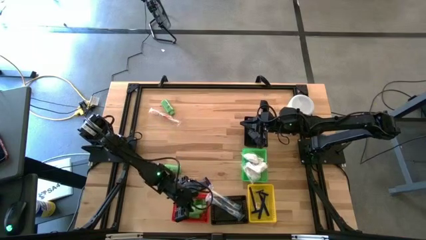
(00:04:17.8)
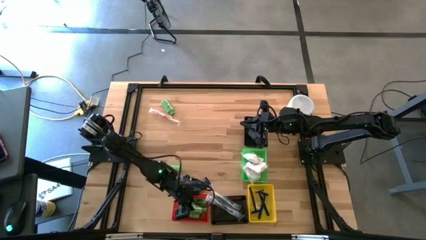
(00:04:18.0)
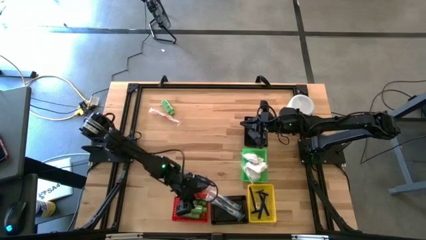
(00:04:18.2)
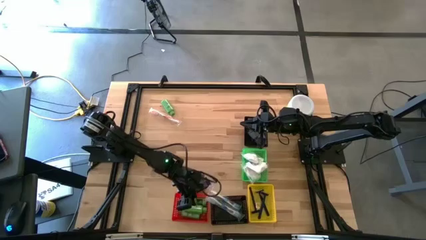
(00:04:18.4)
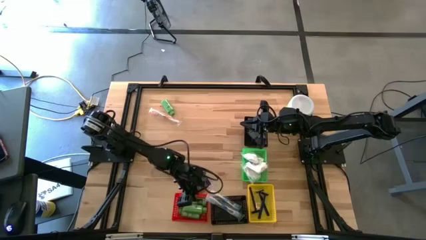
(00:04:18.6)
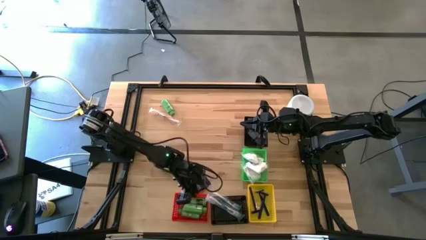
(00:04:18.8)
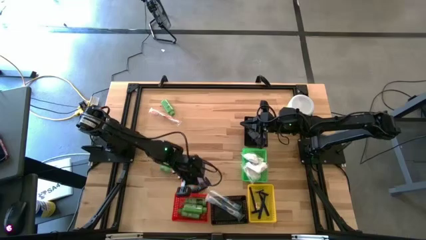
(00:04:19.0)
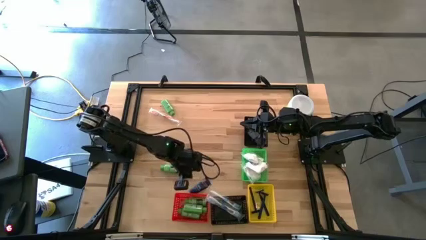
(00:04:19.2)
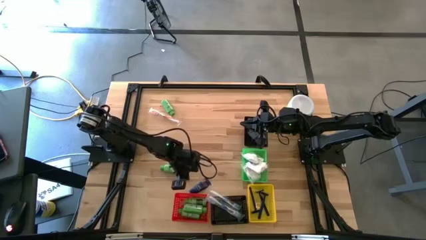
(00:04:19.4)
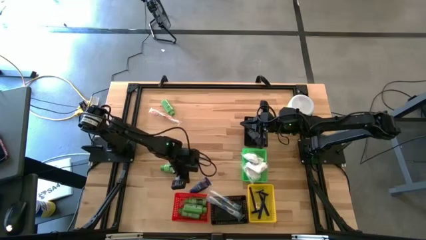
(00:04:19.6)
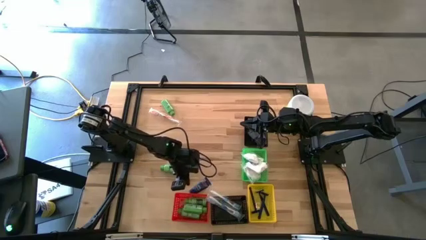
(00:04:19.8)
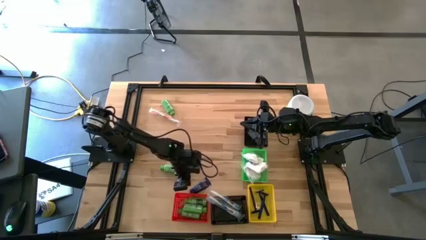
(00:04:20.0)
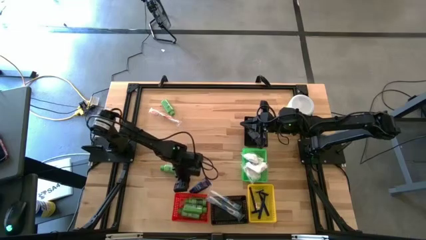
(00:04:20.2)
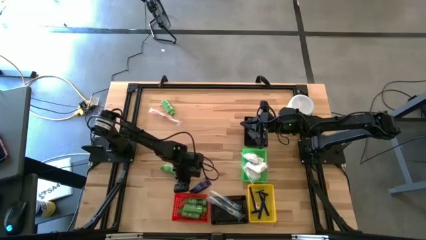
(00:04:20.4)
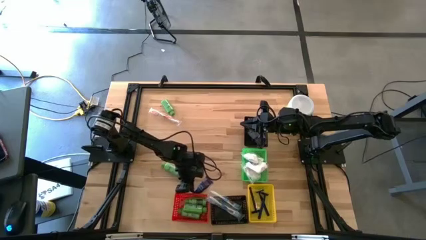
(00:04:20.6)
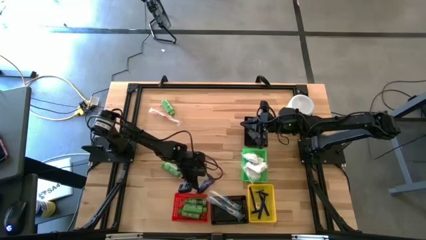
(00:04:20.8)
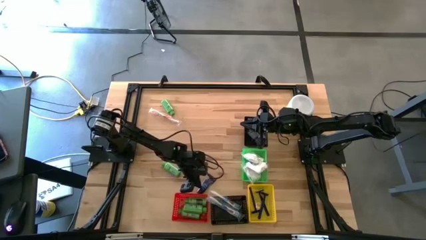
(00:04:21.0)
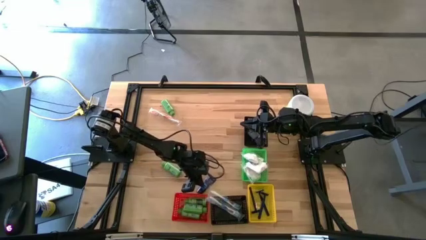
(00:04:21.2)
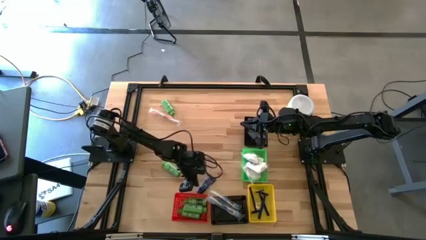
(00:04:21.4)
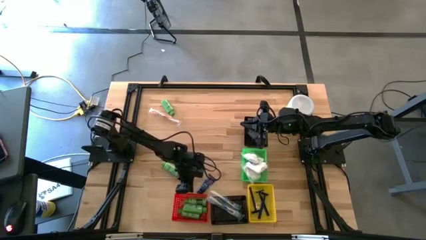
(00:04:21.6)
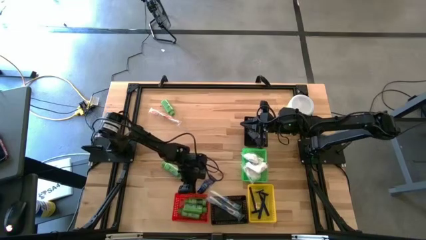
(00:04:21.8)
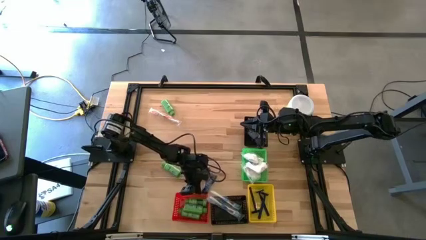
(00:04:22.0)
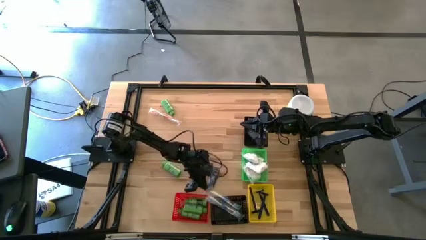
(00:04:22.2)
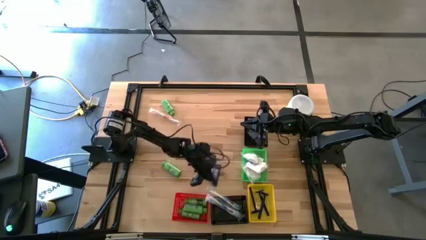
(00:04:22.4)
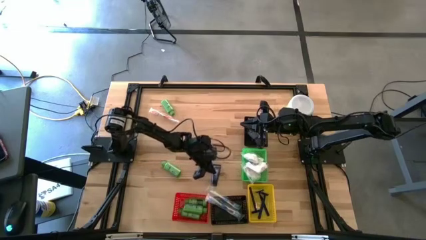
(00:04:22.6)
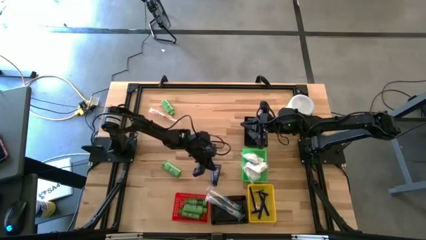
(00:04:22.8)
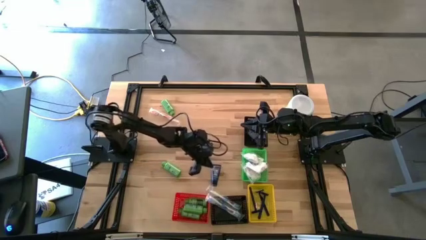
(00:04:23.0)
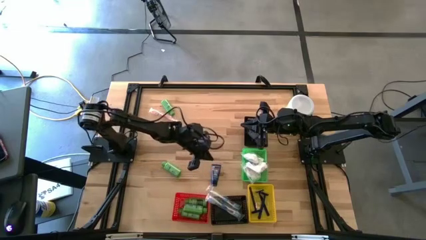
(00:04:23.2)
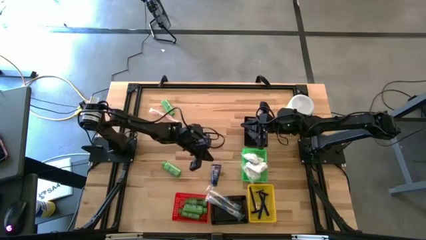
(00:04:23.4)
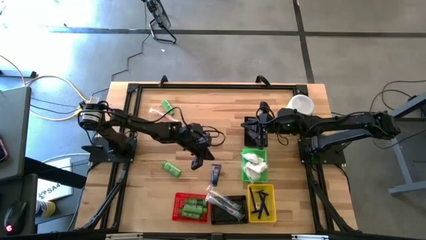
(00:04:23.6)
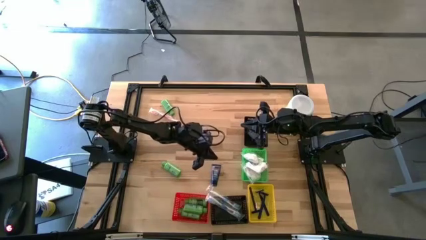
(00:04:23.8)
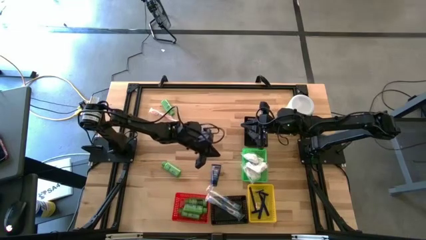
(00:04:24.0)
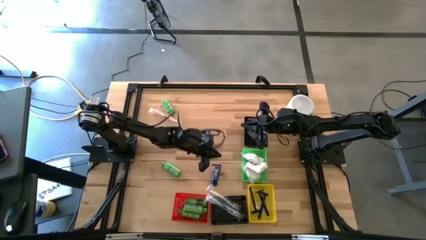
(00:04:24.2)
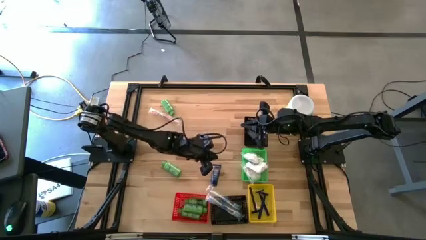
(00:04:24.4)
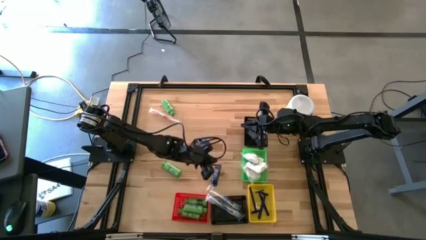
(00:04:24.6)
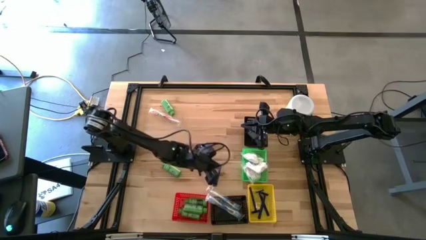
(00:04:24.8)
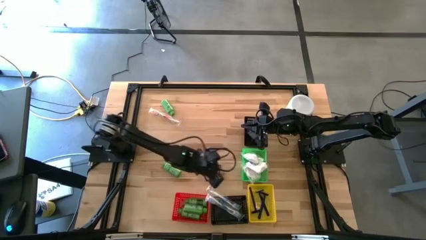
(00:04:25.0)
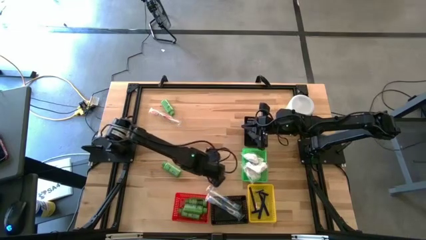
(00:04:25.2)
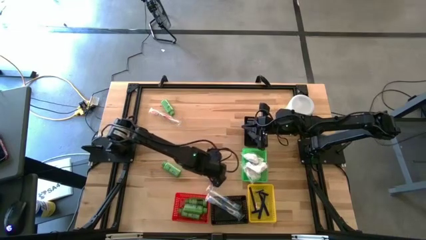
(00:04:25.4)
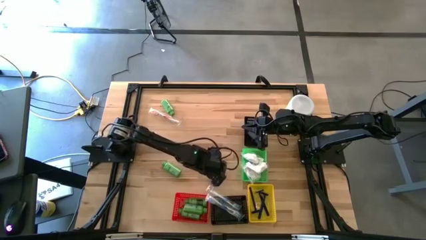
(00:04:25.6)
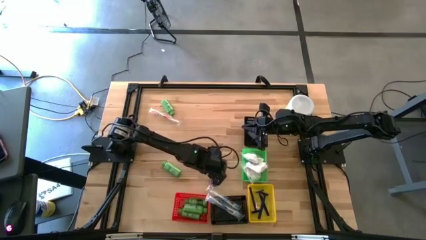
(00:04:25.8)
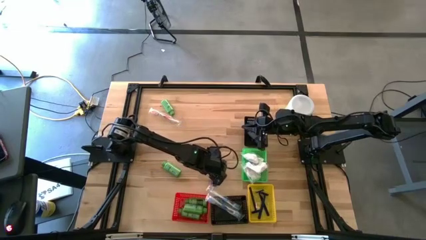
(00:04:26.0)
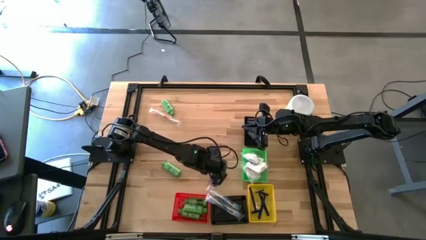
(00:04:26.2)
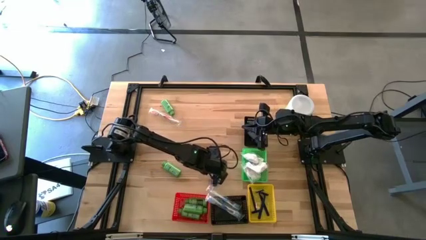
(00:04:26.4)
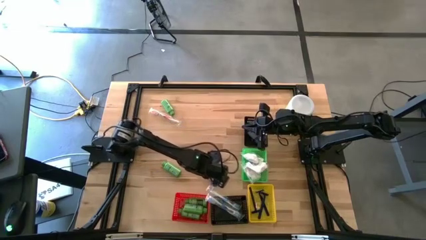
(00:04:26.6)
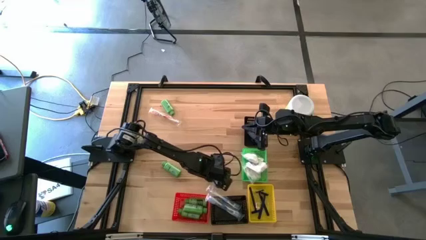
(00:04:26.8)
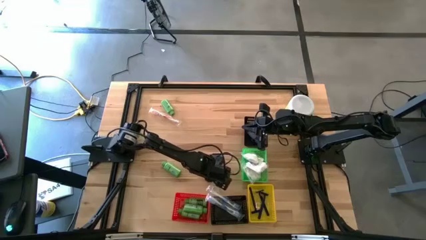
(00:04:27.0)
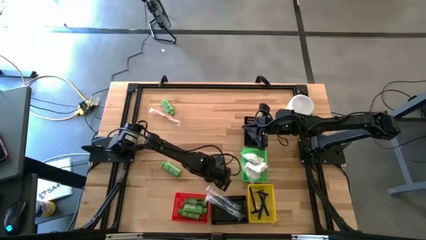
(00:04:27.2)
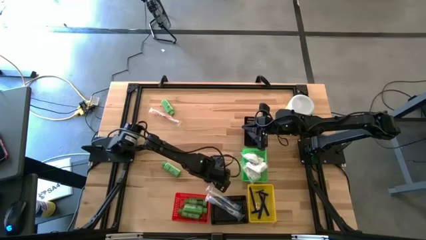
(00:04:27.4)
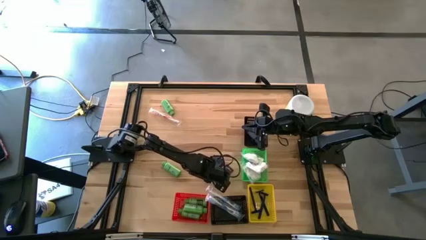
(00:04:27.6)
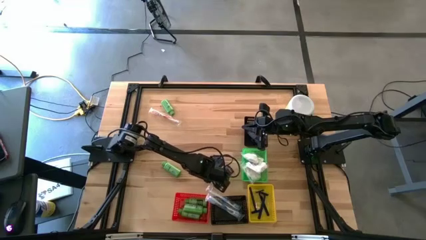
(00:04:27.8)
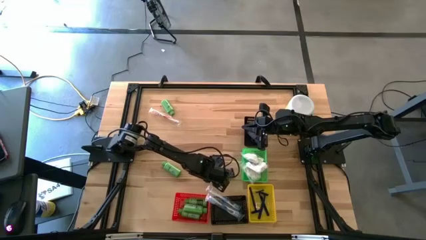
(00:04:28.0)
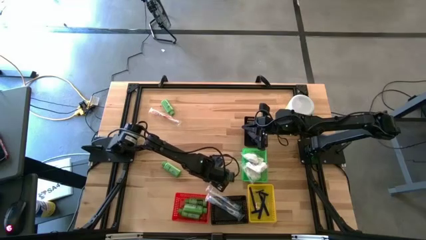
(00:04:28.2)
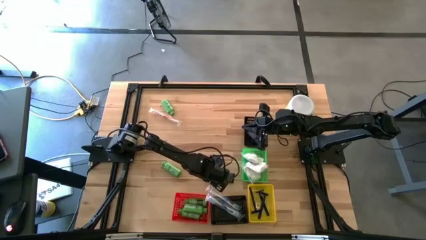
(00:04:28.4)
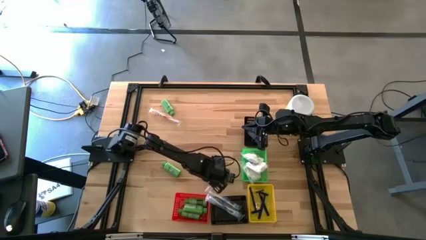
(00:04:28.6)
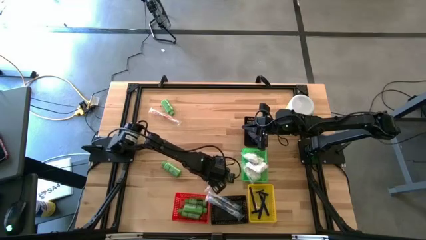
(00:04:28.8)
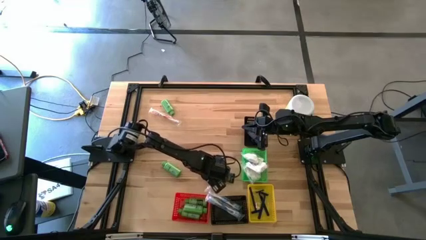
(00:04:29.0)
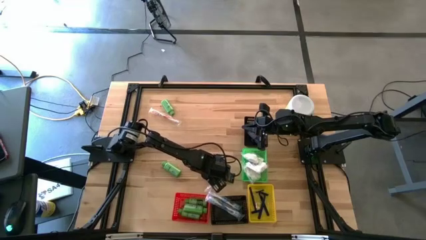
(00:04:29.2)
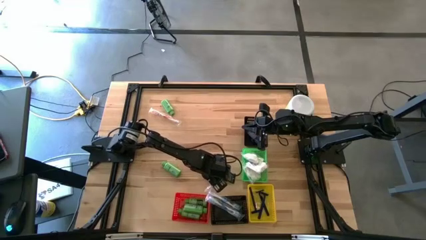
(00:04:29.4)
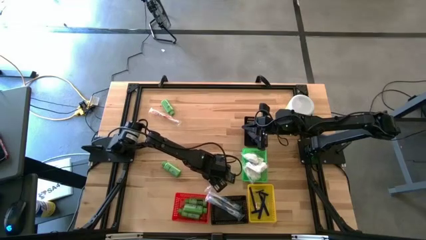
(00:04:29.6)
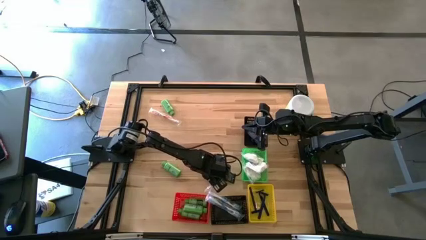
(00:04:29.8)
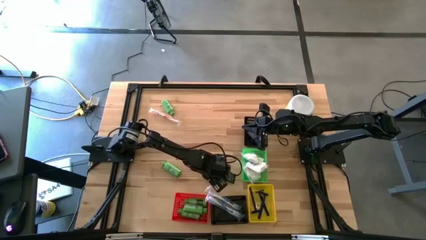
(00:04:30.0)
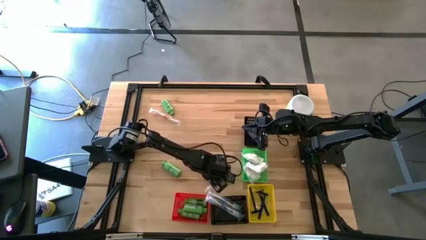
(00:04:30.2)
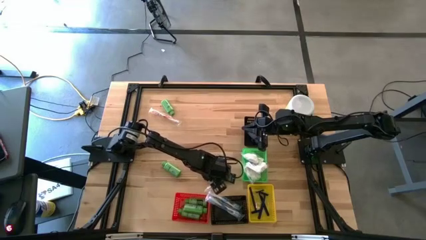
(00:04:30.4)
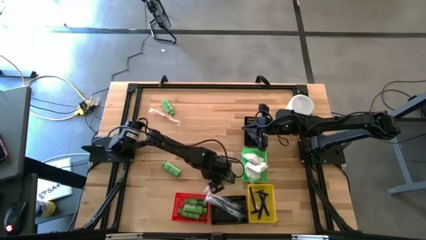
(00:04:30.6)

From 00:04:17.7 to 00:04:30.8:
Task: Pick & Place Travel size toiletries
Put the blue shaving cream into the top black bin
